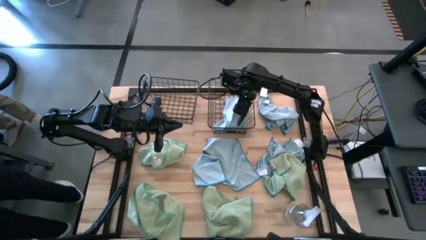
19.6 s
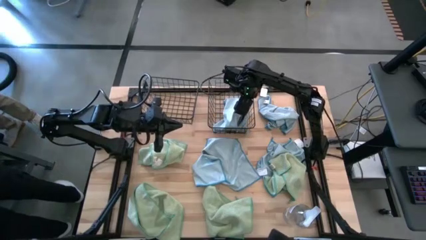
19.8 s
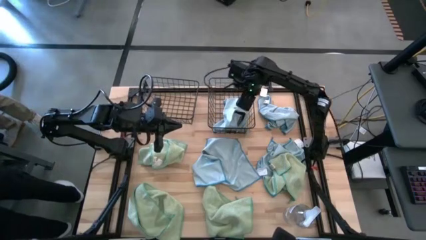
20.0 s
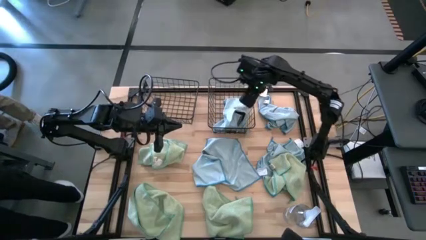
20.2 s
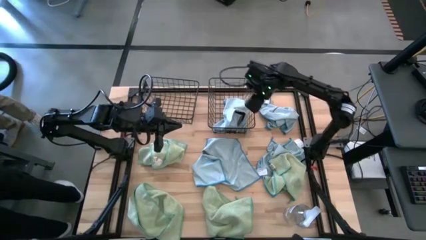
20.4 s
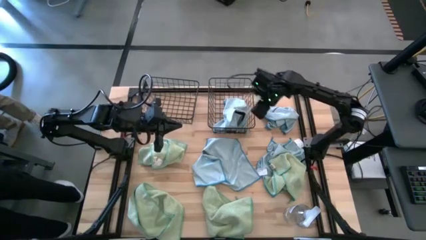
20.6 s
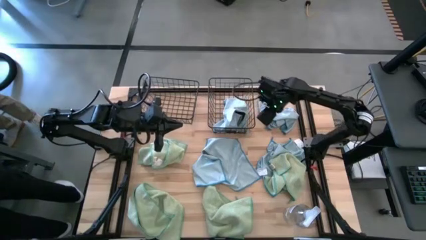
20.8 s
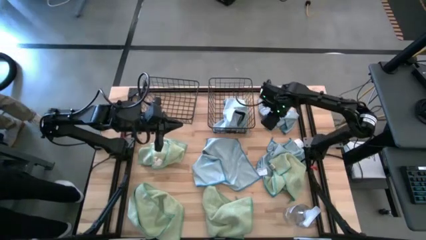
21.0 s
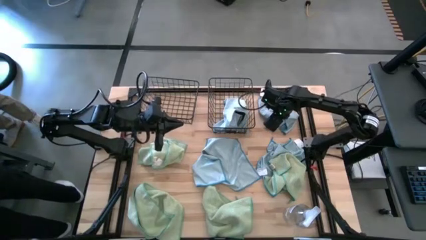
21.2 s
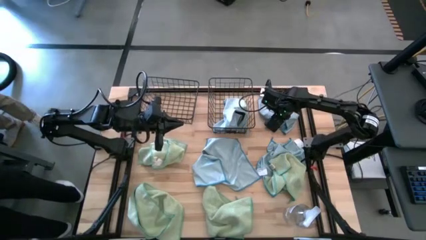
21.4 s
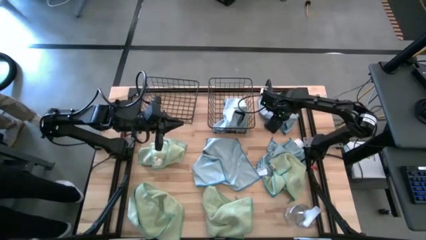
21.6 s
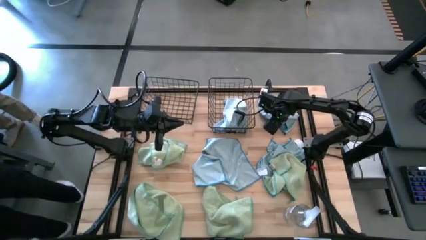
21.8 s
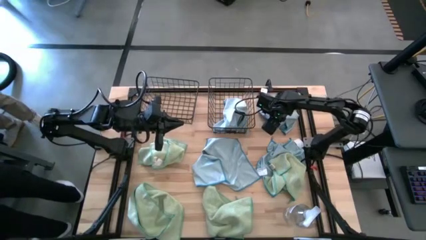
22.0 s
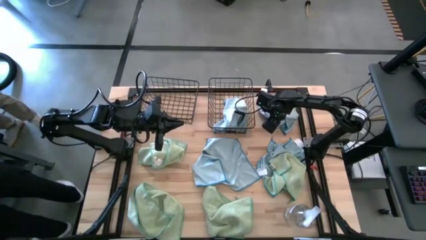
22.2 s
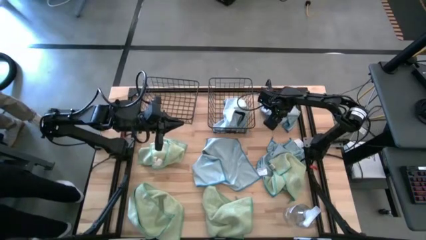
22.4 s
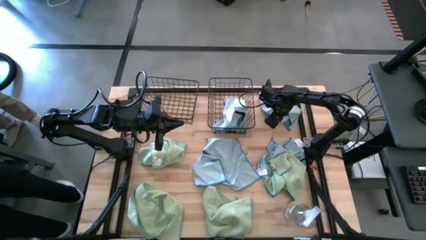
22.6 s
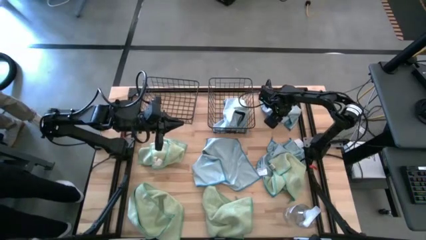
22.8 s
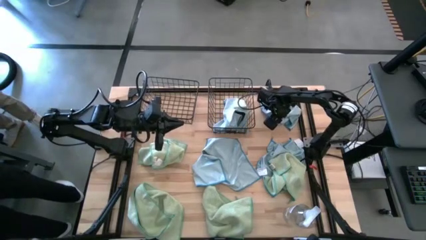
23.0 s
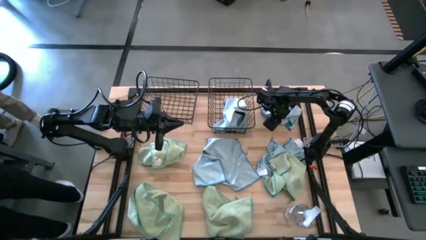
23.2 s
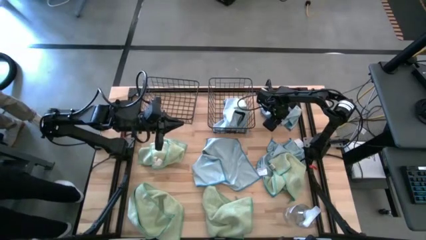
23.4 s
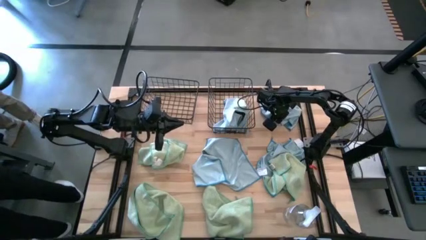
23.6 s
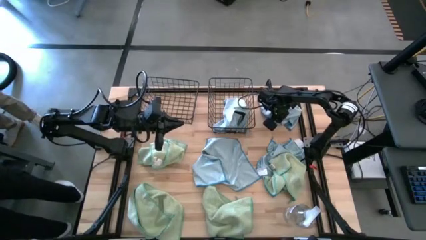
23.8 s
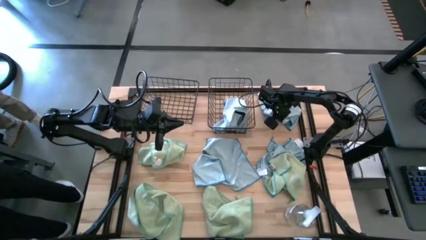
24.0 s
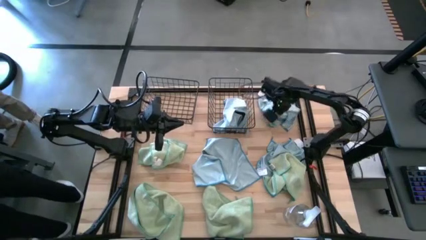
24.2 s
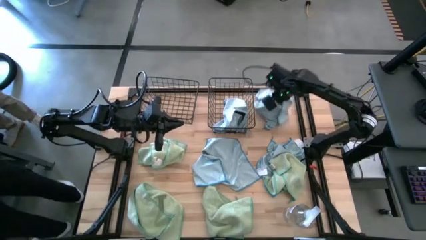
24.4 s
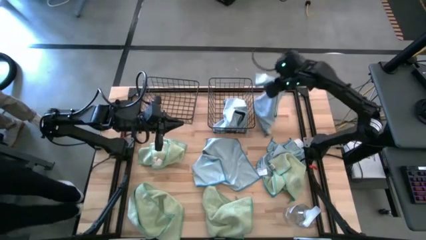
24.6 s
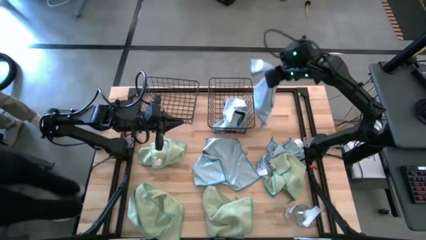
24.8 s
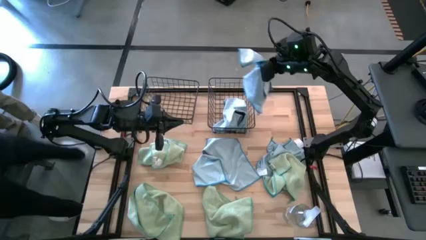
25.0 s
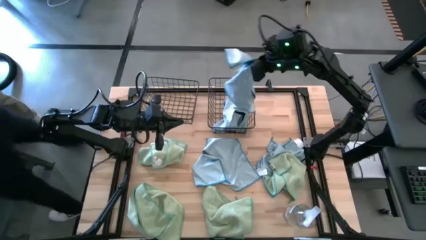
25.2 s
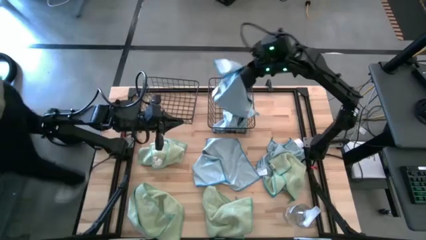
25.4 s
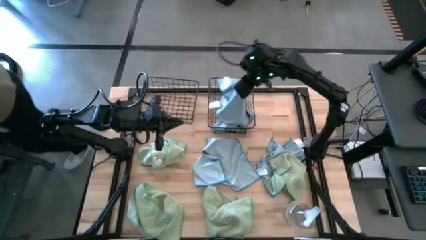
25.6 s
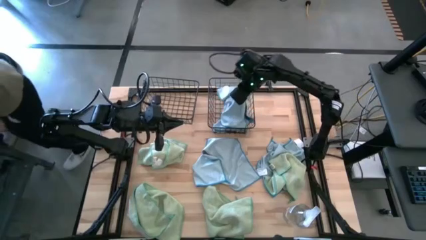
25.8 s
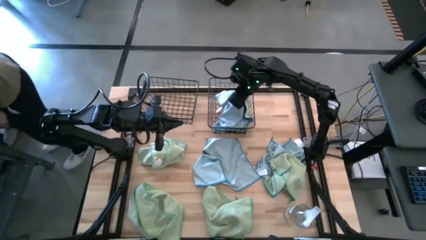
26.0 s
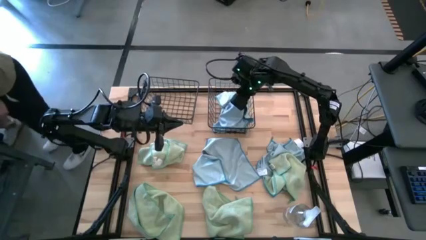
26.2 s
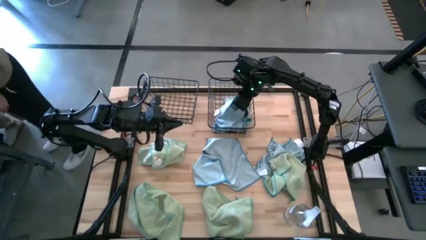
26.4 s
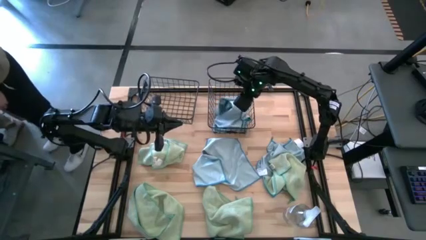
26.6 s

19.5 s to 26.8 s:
Task: Sort microfiber towel by color & place in baskets
Put the blue towel into the right wire basket

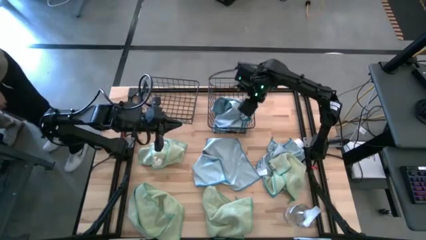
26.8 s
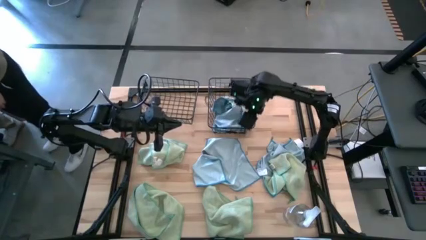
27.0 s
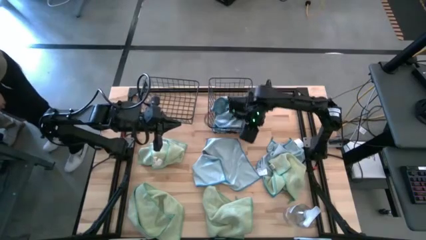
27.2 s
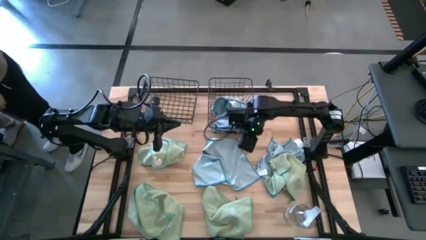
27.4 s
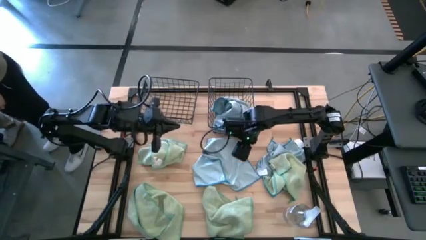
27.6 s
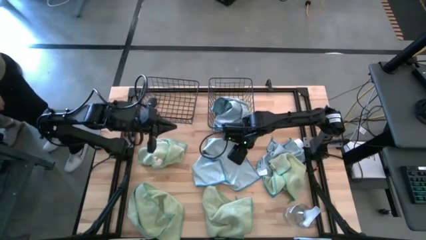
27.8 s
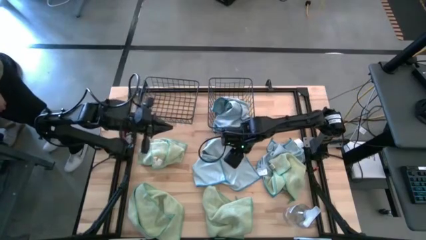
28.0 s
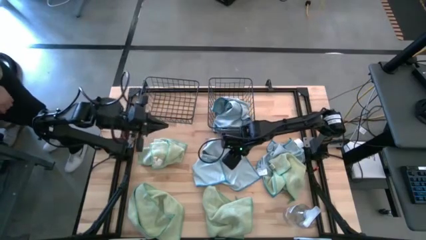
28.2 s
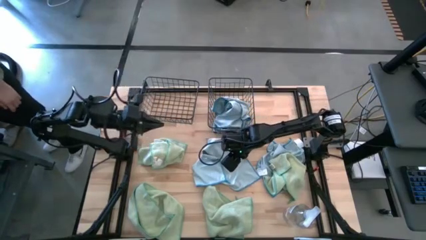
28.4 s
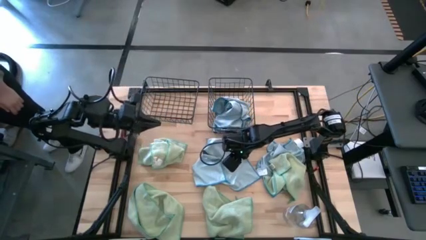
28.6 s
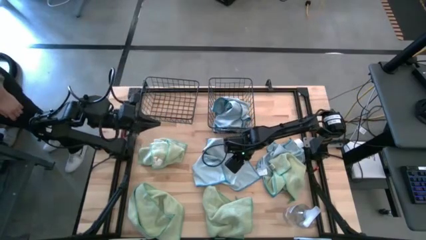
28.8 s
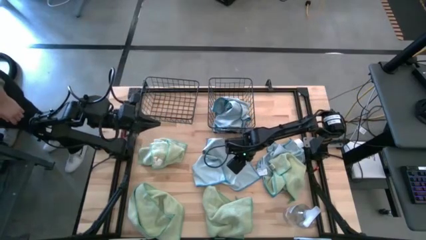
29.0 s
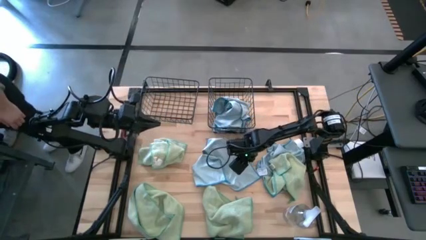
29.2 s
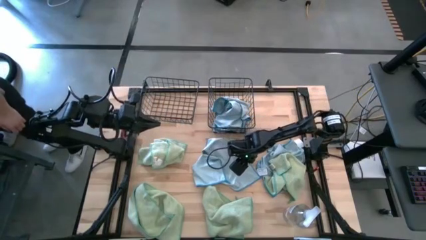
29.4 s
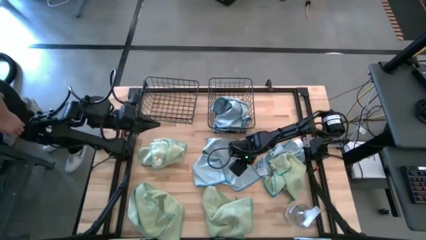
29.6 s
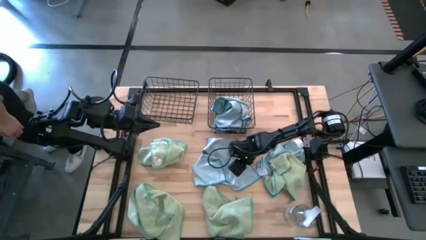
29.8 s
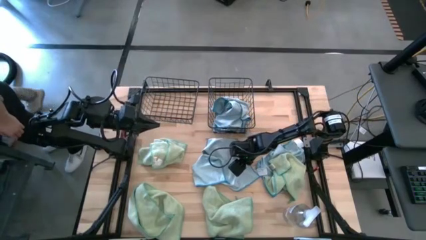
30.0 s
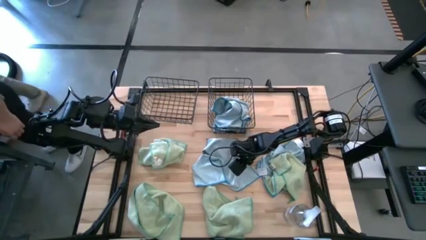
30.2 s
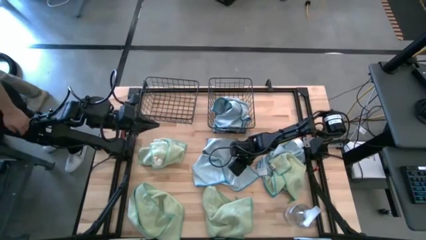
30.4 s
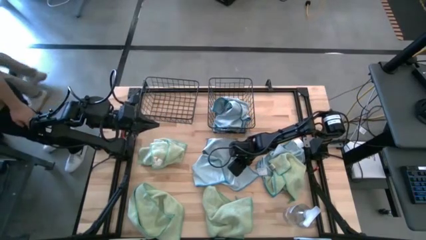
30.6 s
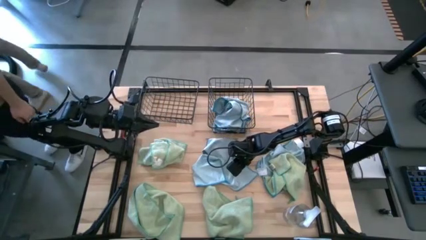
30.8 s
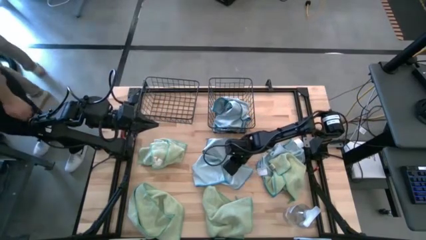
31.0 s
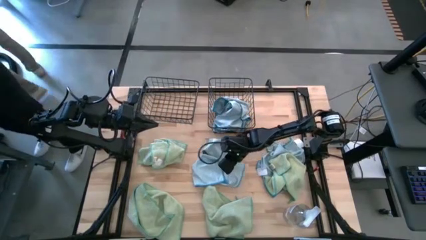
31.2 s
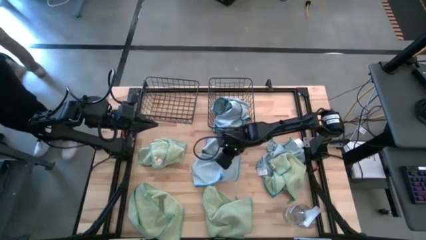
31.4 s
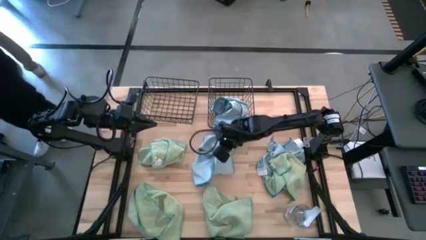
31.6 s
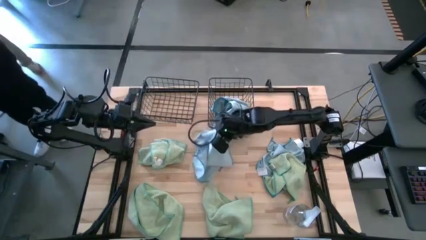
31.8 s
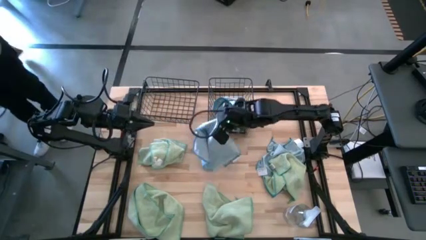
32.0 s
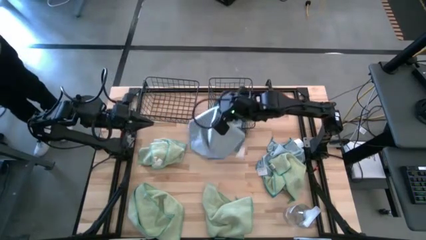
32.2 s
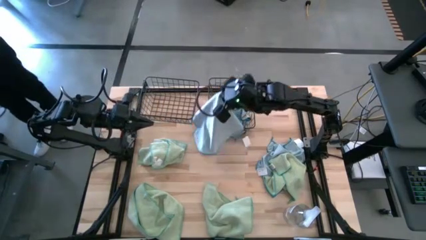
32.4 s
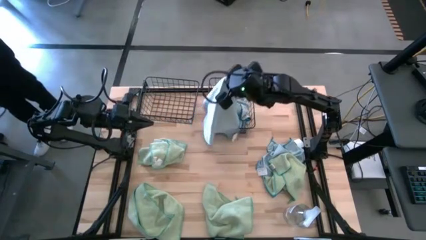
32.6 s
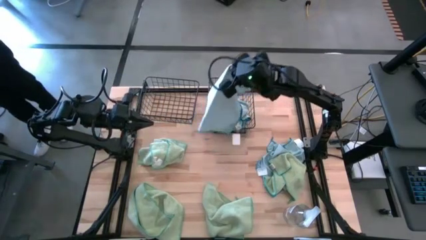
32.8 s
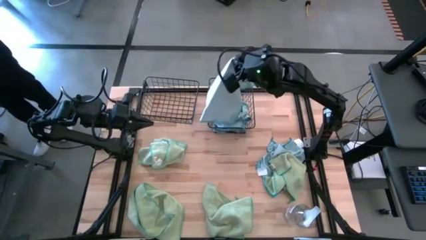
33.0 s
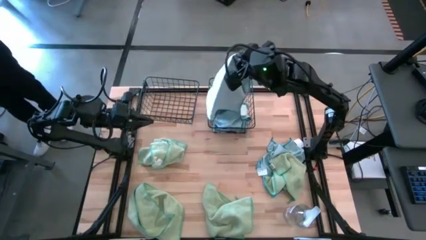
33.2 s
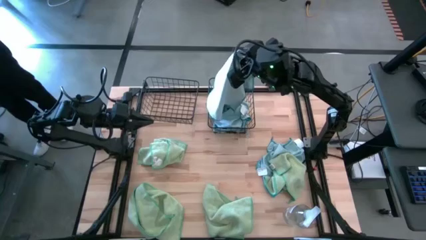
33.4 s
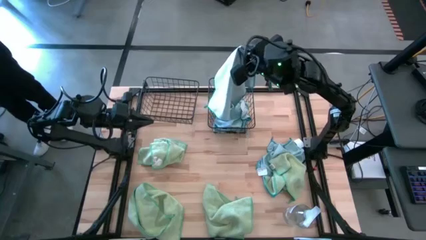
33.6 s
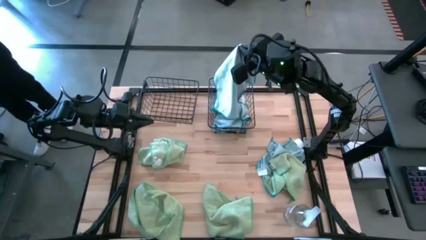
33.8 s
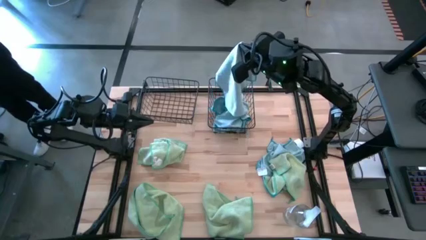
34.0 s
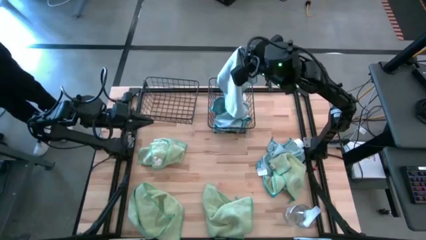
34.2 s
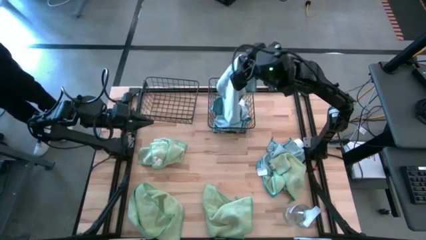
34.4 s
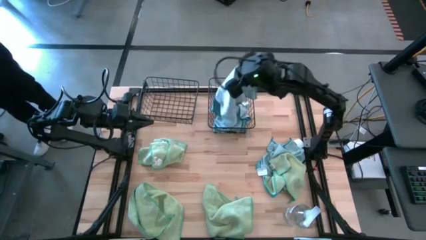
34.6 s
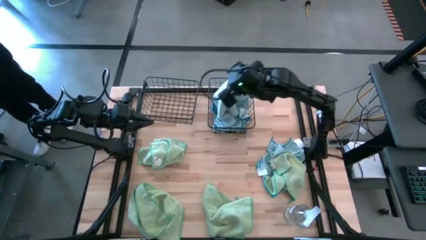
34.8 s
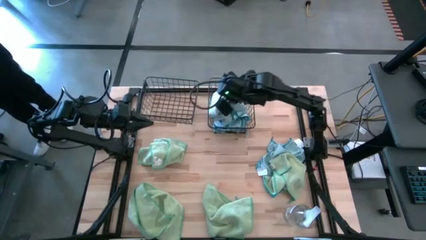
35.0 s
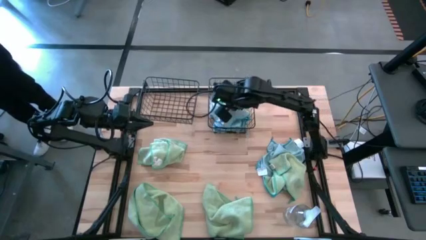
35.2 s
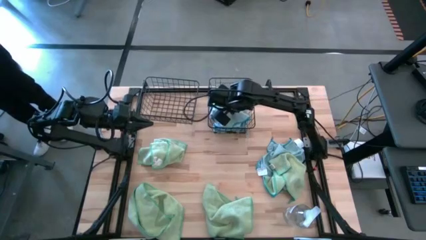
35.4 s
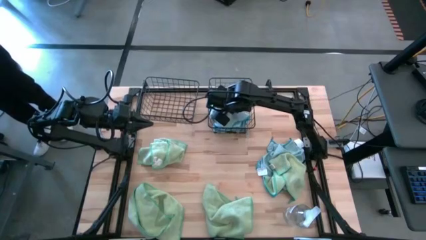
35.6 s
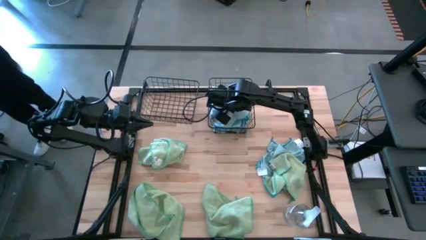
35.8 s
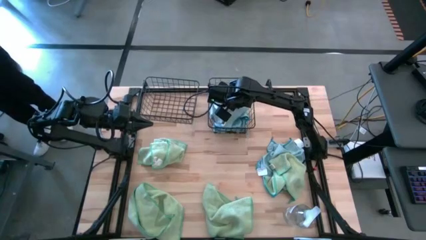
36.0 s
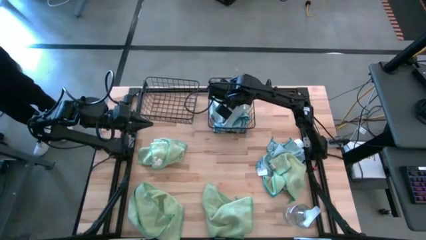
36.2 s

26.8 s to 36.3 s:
Put the blue towel into the right wire basket
